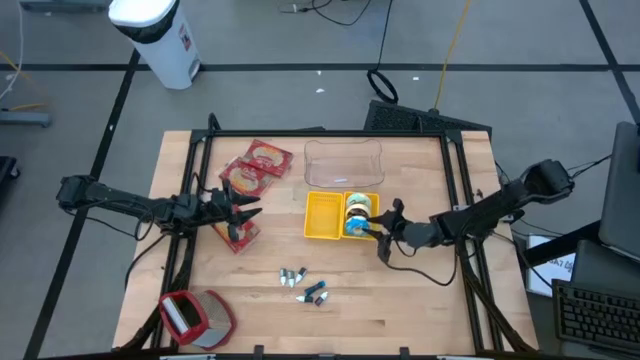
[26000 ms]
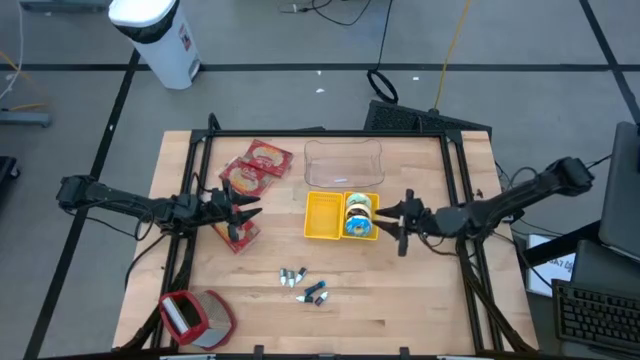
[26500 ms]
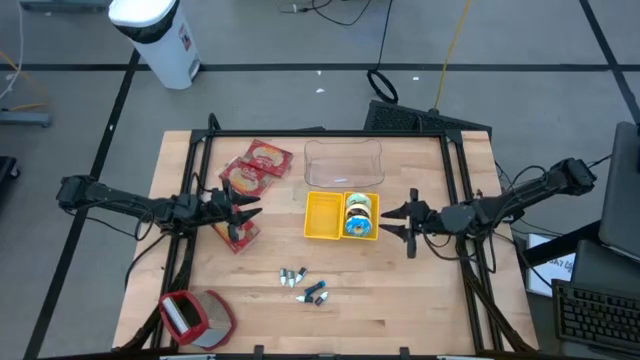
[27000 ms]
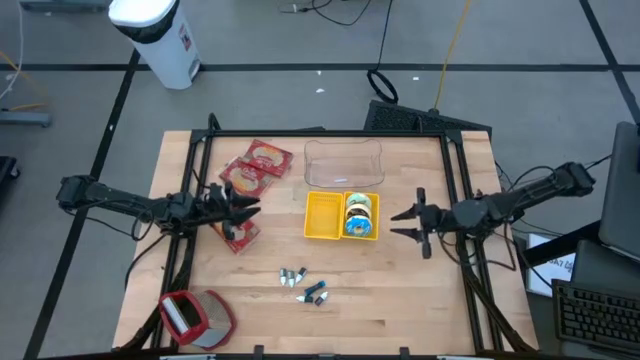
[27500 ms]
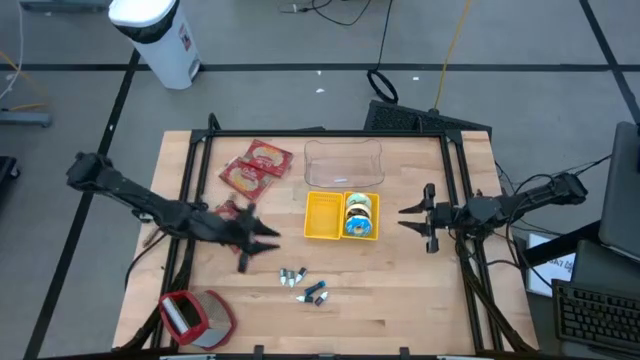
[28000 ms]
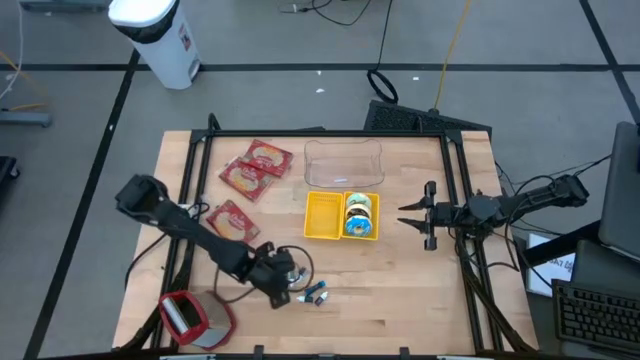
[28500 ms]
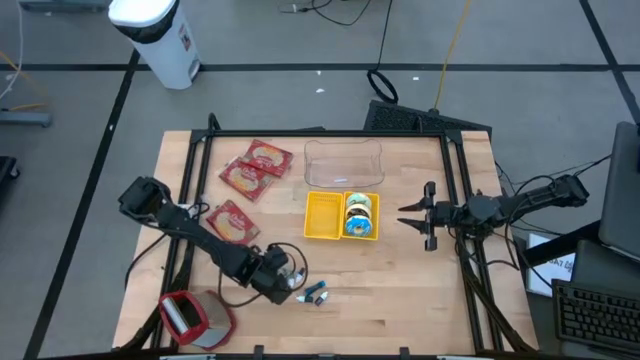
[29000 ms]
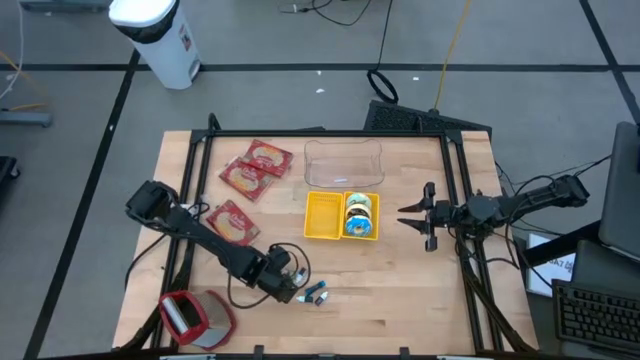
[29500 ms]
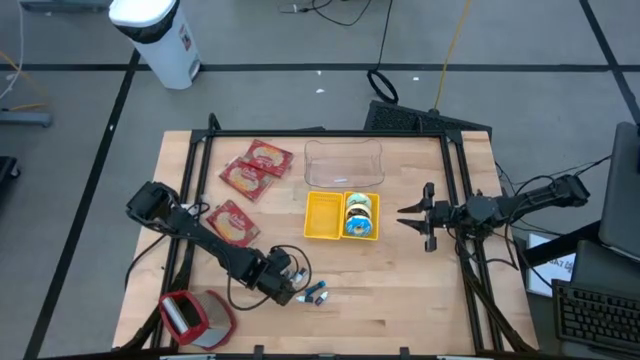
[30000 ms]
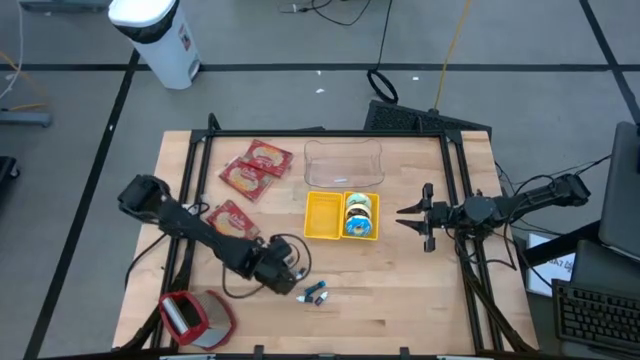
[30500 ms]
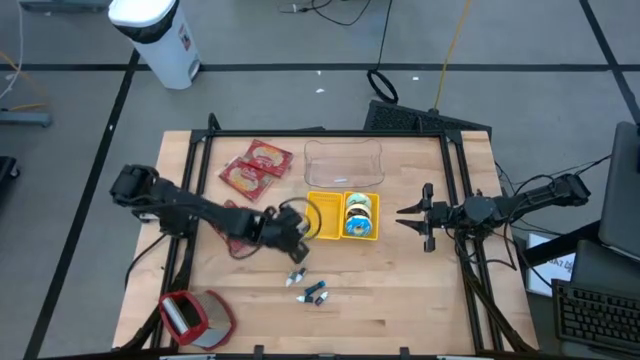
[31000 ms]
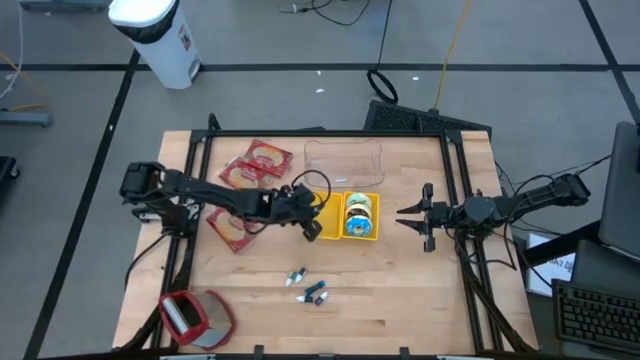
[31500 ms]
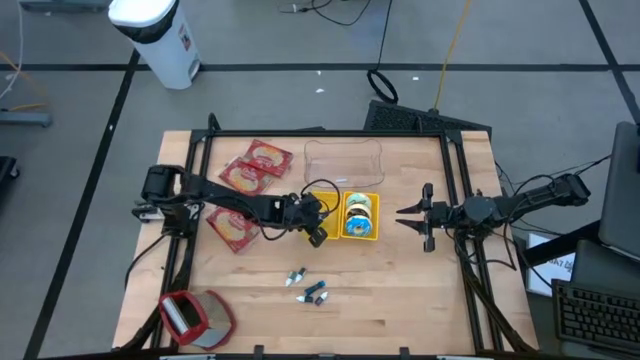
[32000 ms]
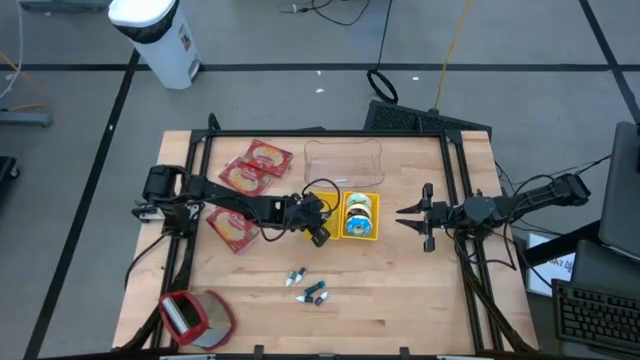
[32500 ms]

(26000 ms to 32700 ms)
Put the left green food coloring bottle into the left yellow bin

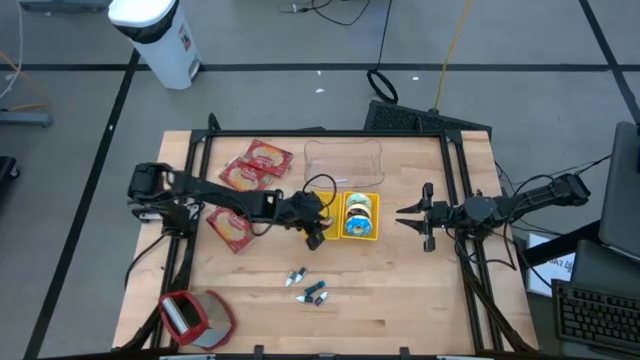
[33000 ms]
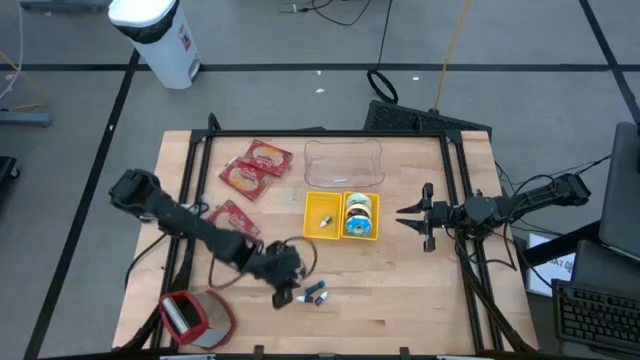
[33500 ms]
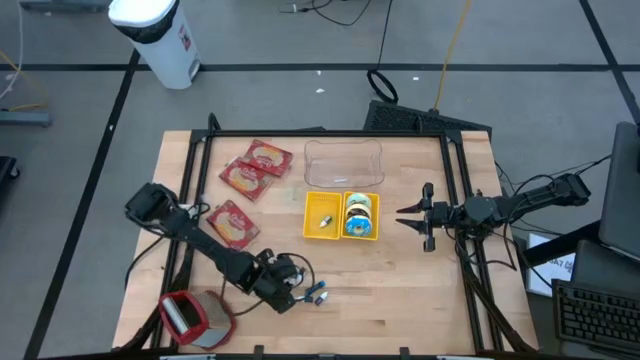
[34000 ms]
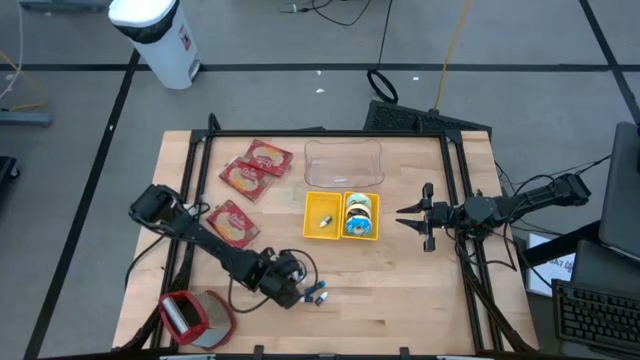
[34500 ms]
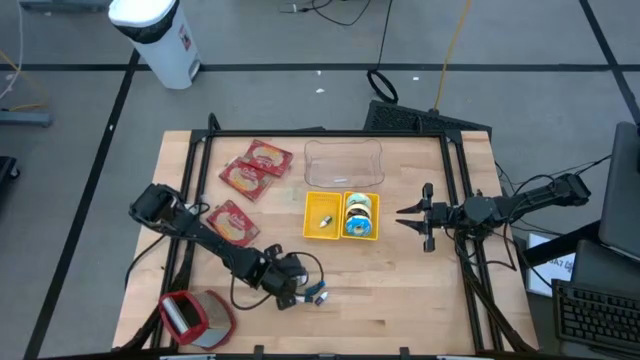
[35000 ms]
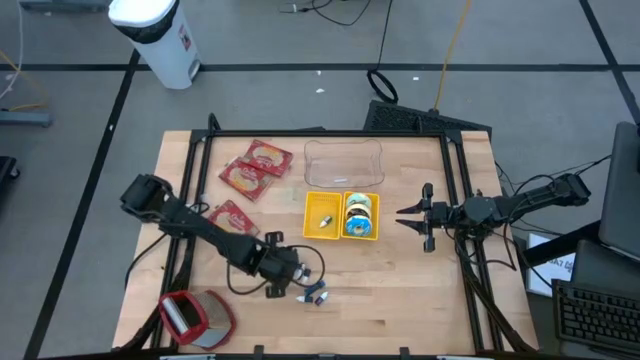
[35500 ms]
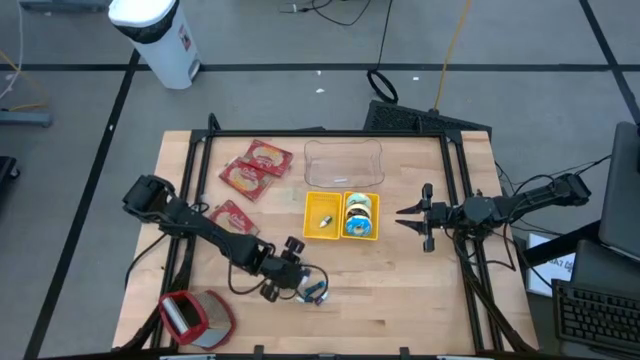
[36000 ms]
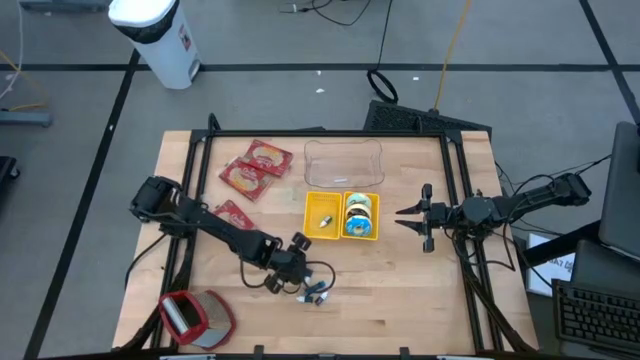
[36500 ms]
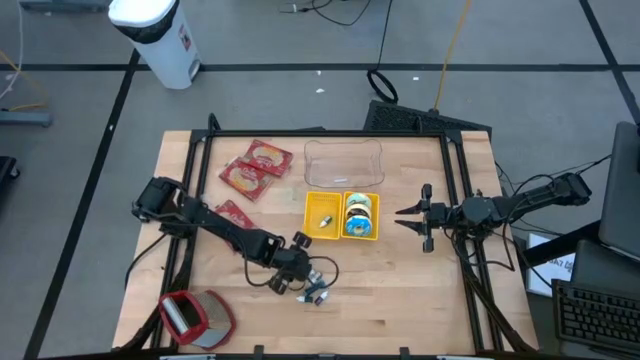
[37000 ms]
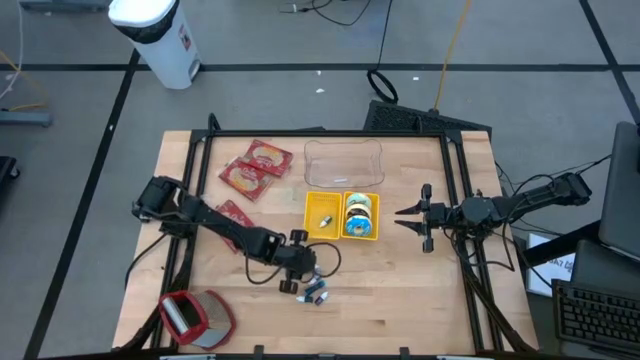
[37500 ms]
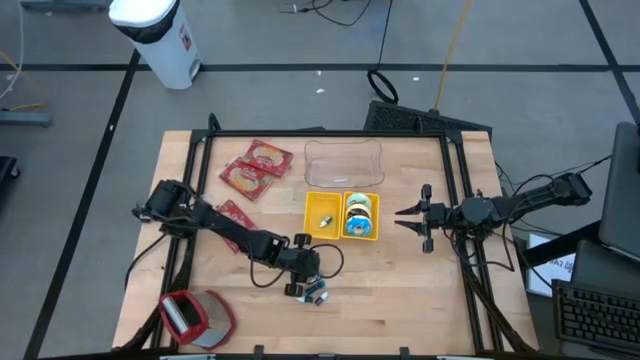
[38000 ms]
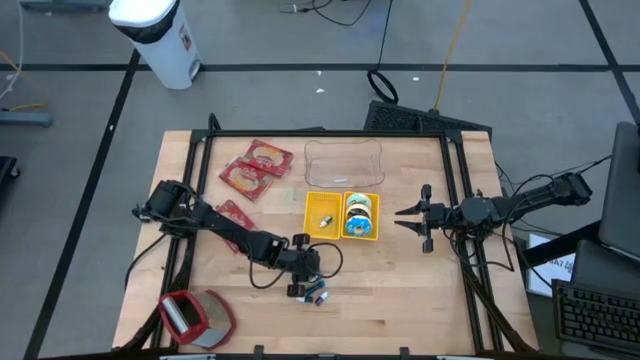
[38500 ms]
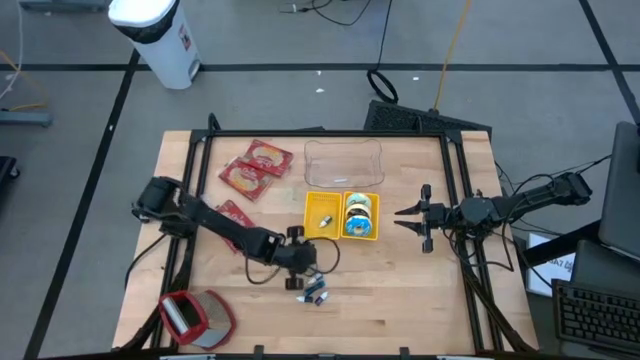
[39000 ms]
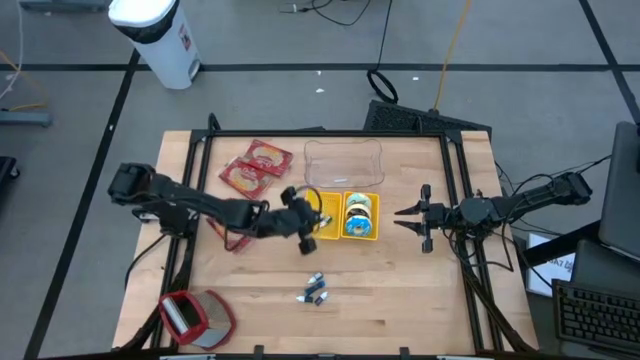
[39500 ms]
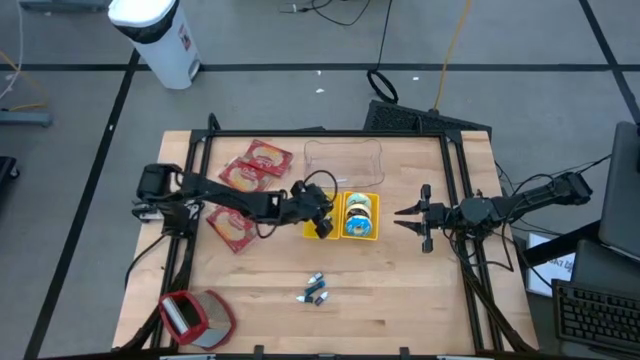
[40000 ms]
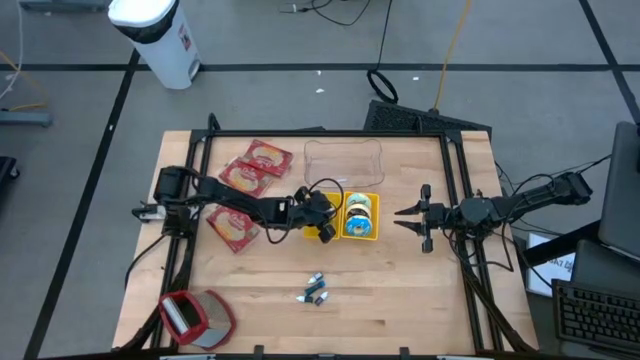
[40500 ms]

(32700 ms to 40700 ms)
Put the green food coloring bottle into the left yellow bin

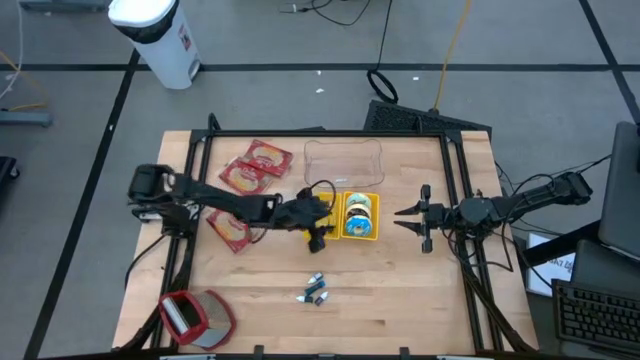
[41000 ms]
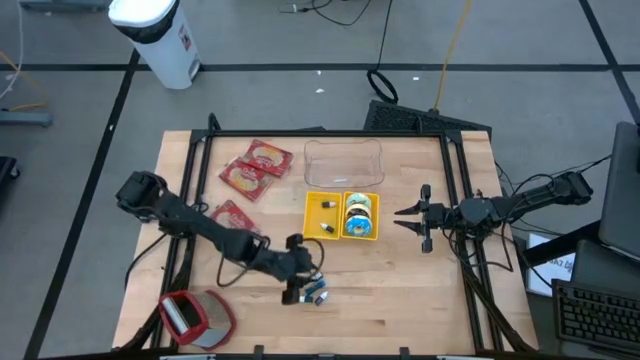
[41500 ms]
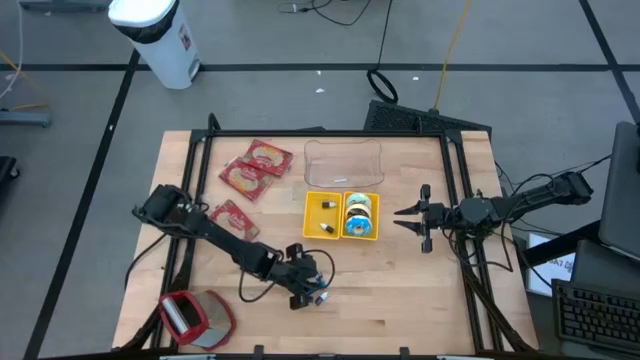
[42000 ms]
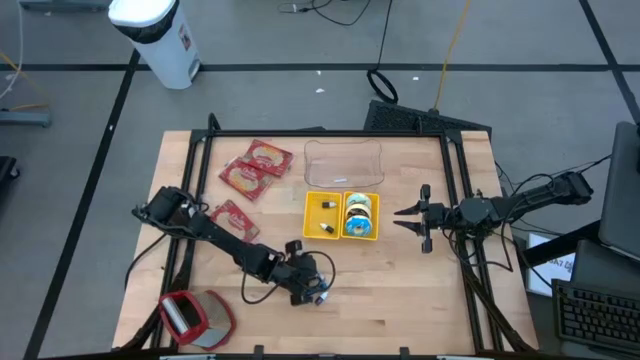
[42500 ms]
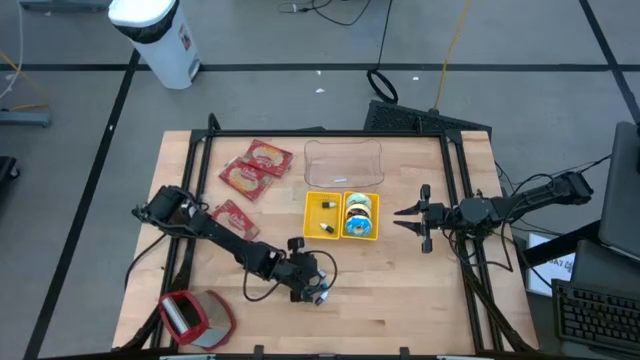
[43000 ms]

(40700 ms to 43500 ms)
Put the top blue food coloring bottle into the left yellow bin

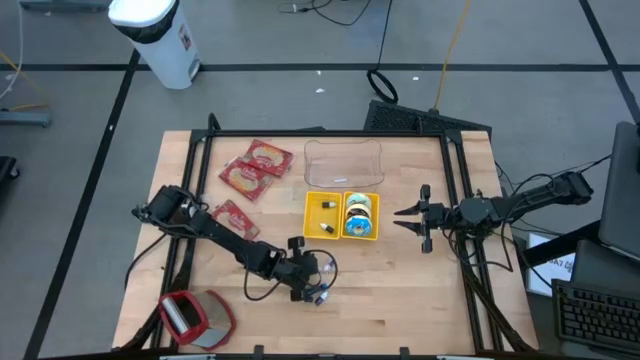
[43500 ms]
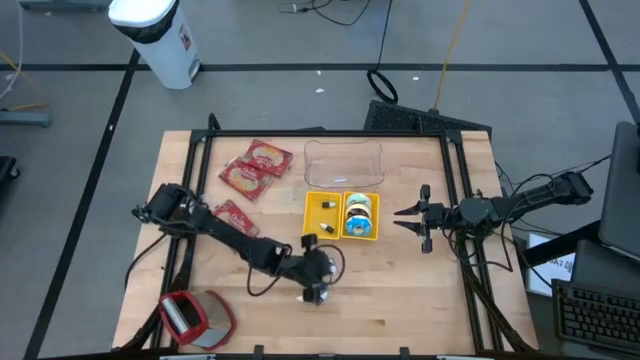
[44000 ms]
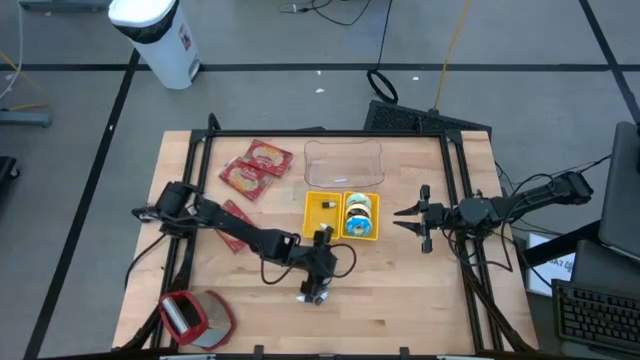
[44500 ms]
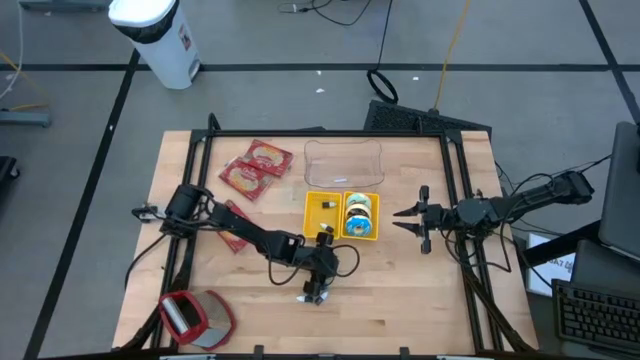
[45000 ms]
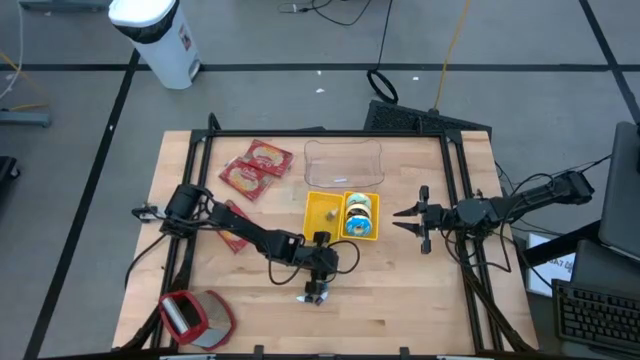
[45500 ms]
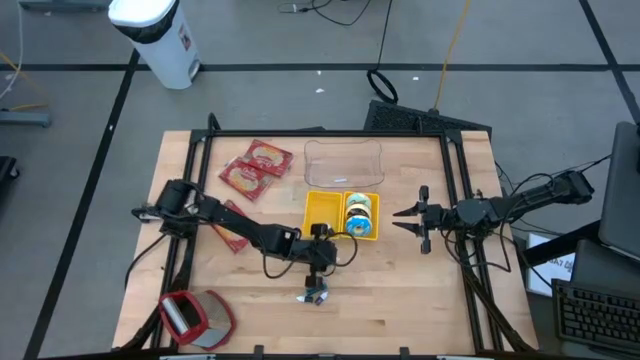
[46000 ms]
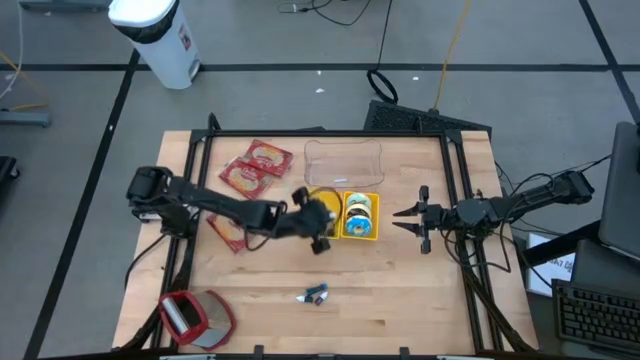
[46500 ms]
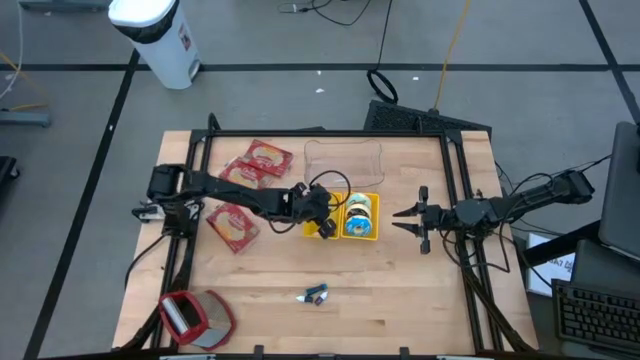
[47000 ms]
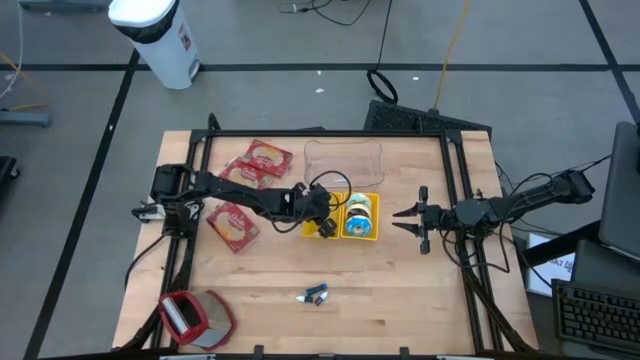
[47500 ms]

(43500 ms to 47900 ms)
Put the top blue food coloring bottle into the left yellow bin
